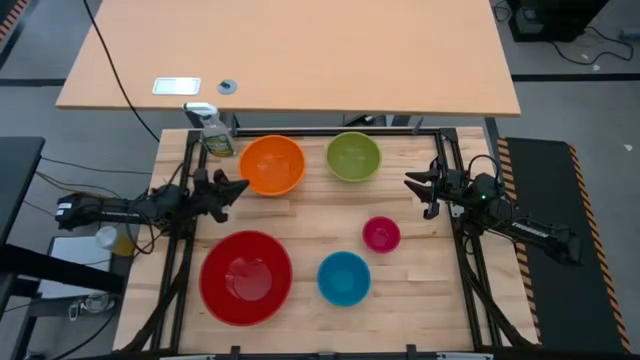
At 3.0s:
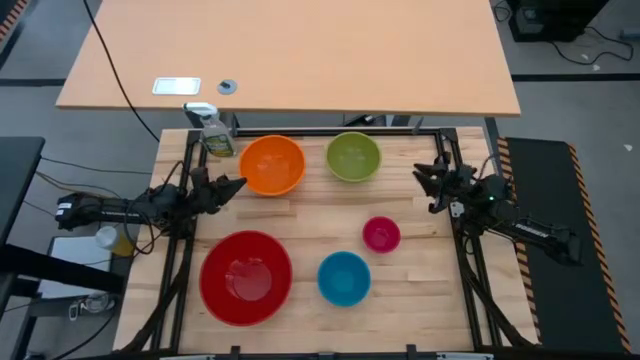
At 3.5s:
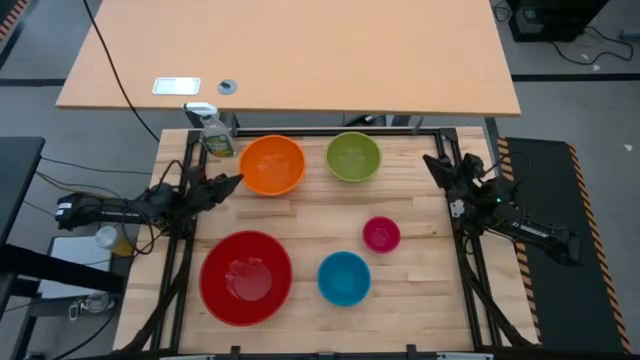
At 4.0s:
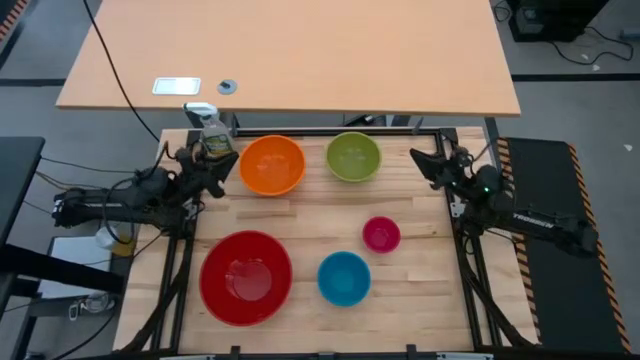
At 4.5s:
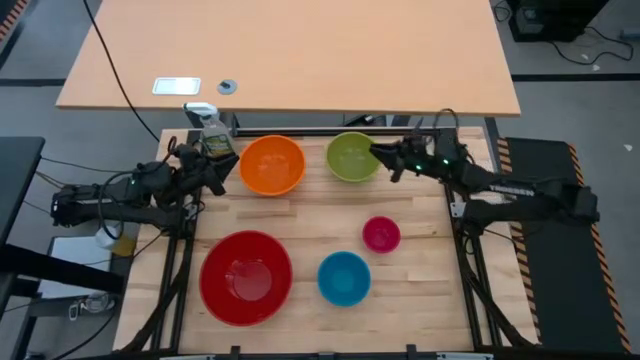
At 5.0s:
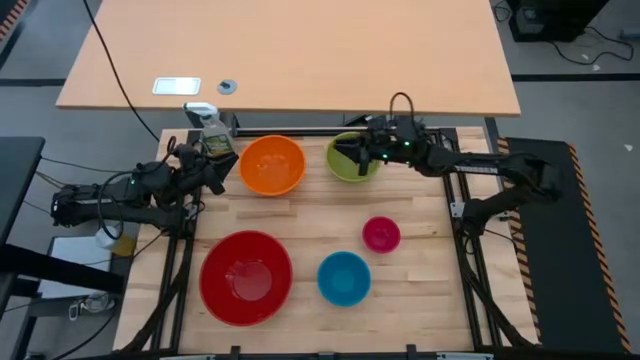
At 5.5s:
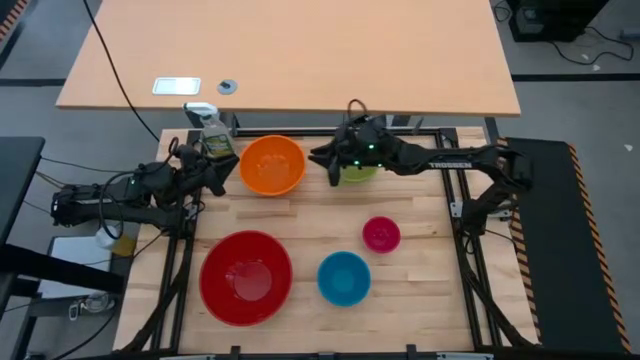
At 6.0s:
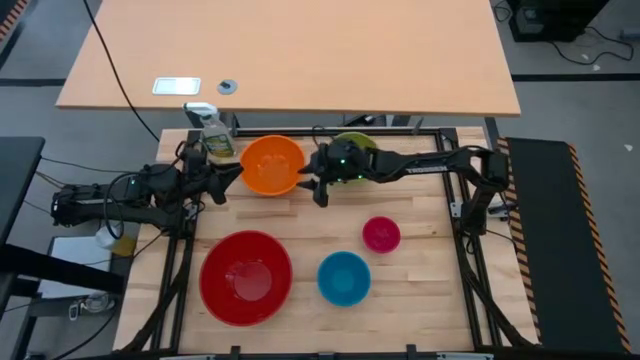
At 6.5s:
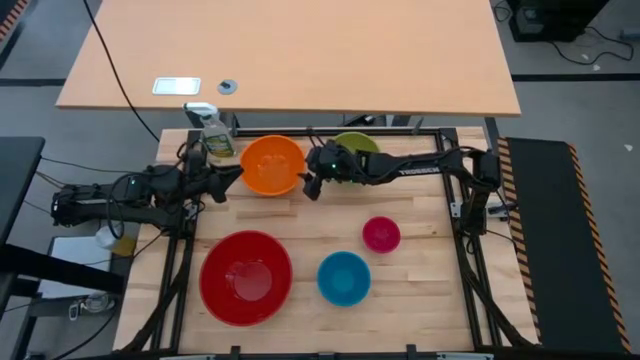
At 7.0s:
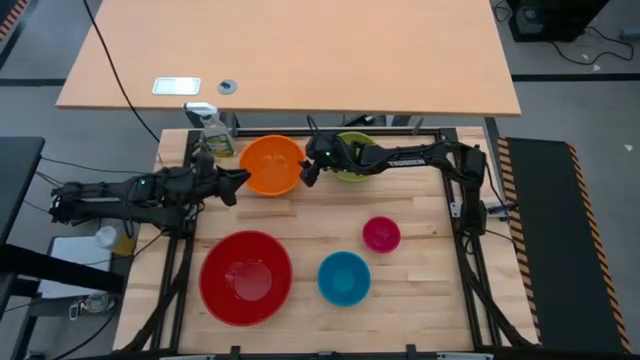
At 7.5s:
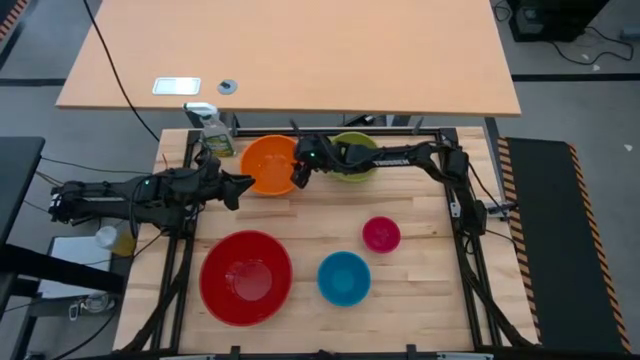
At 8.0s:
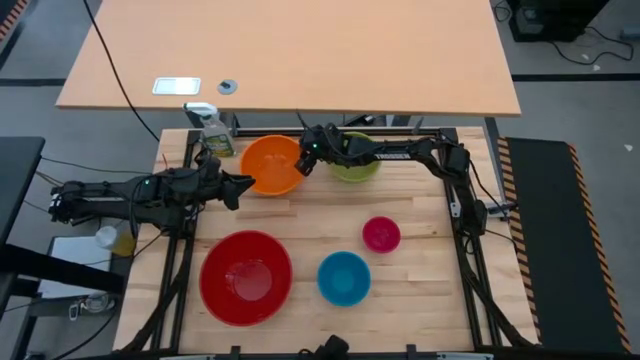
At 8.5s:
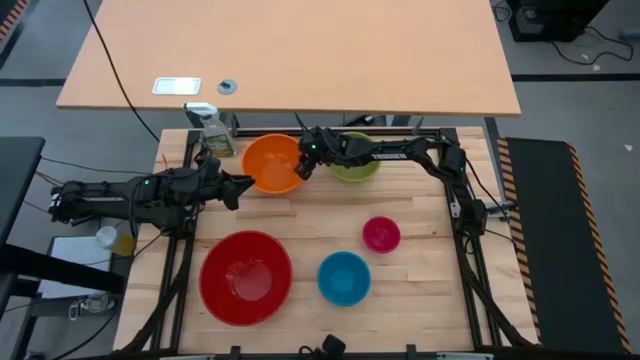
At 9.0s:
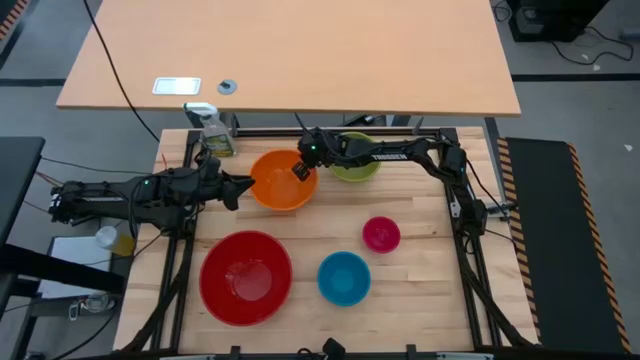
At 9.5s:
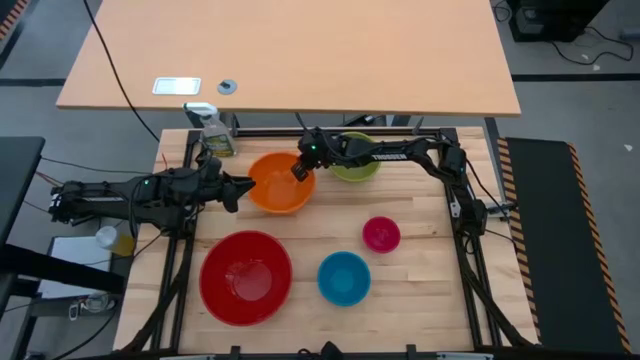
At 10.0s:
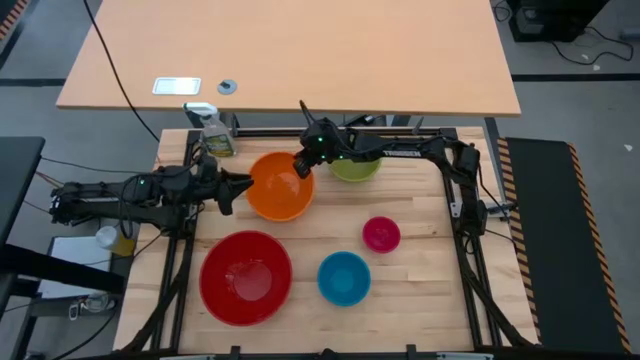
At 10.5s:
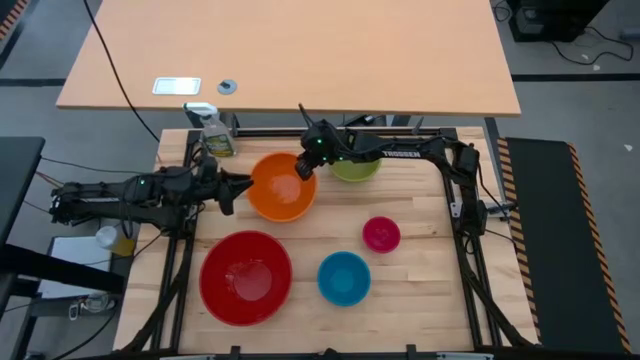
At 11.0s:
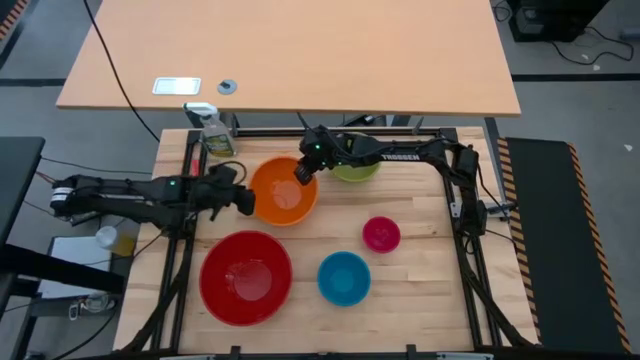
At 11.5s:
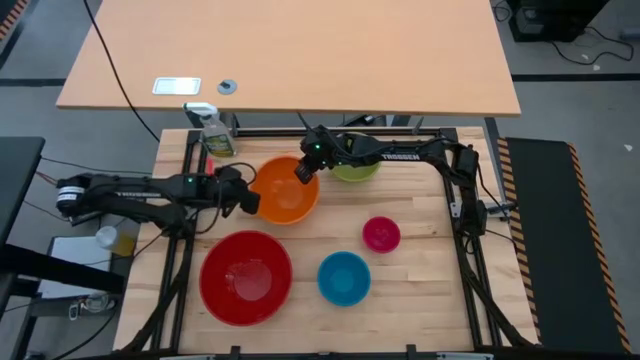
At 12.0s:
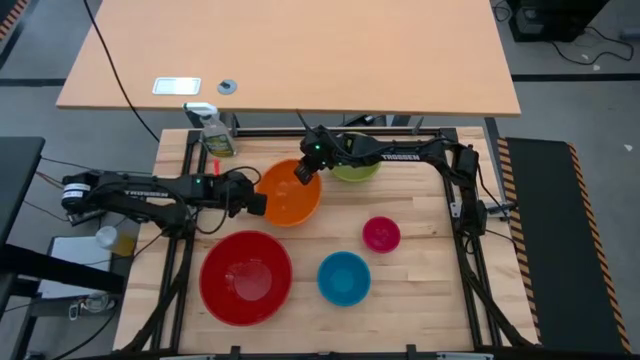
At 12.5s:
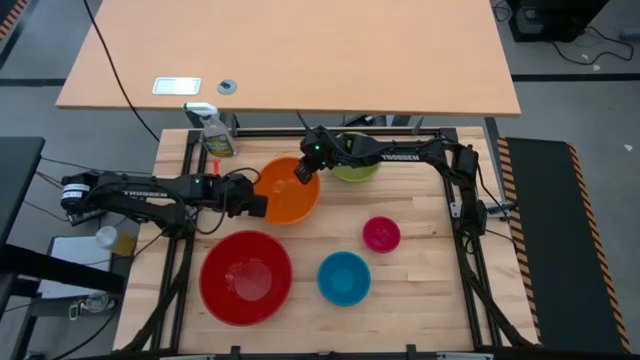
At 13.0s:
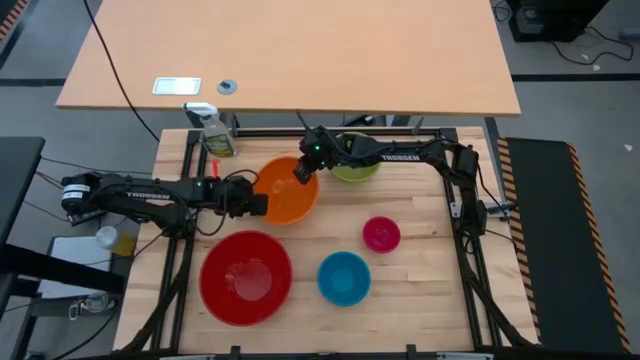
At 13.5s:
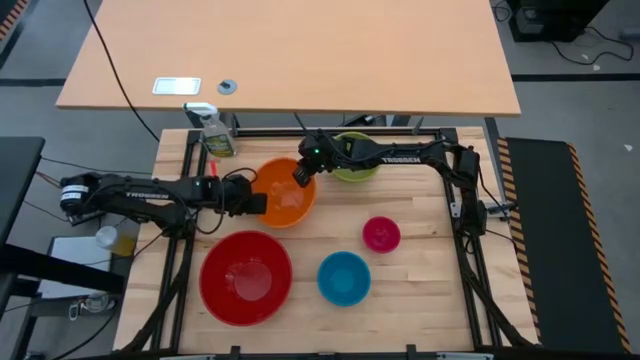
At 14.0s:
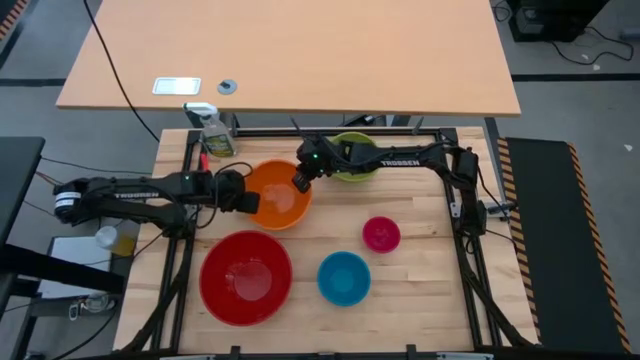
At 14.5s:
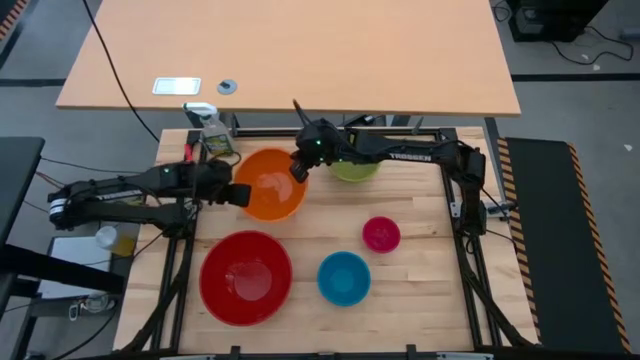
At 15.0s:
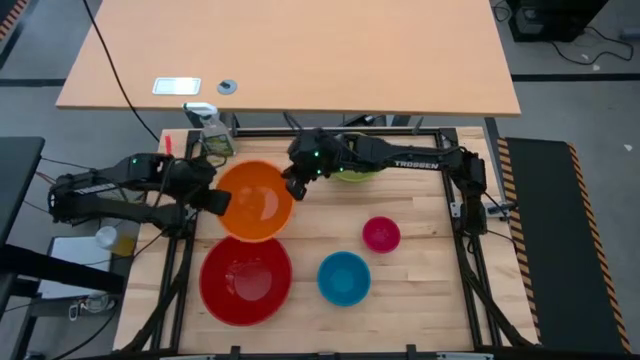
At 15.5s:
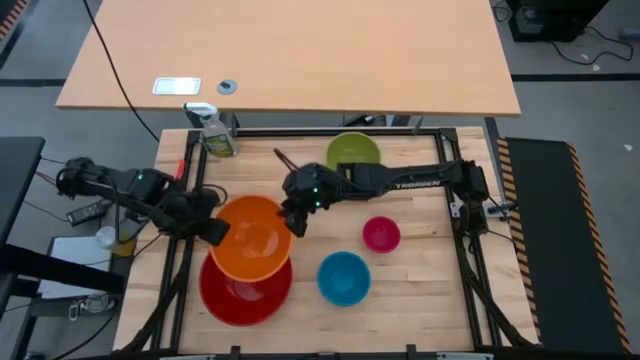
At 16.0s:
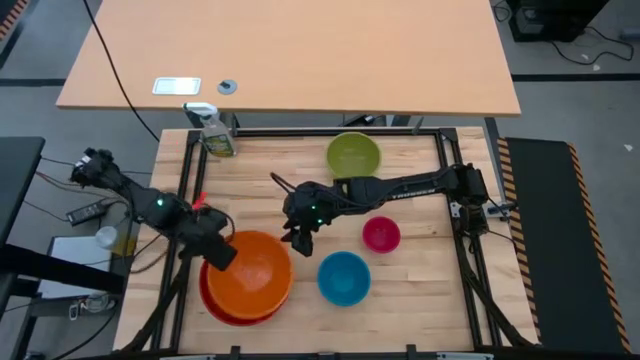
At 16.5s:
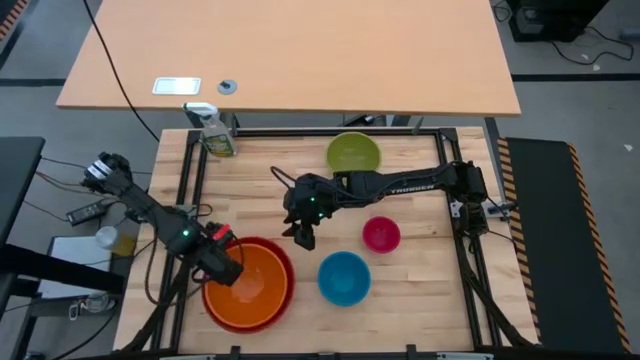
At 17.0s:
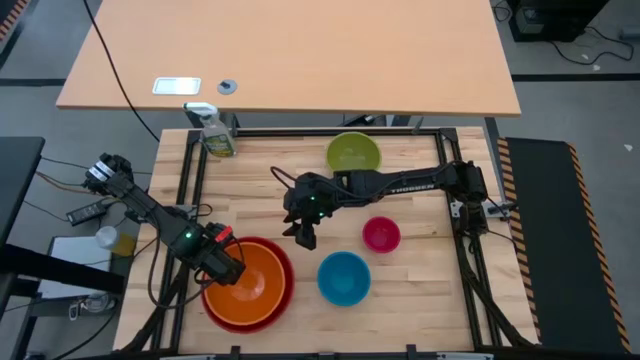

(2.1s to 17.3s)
Stack the orange bowl on top of the red bowl
